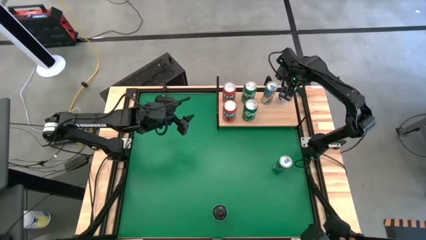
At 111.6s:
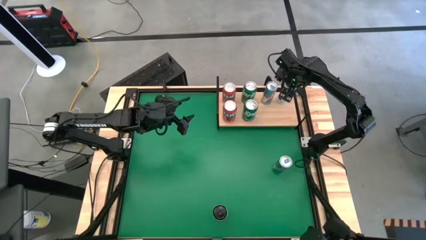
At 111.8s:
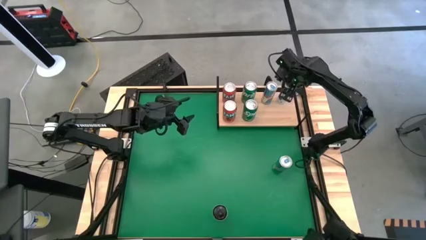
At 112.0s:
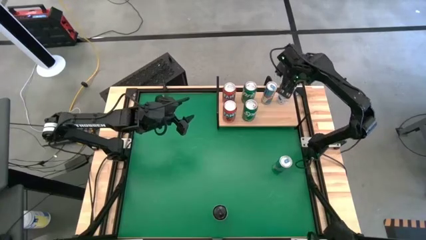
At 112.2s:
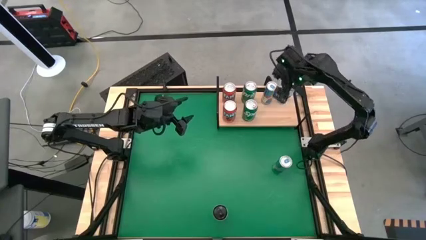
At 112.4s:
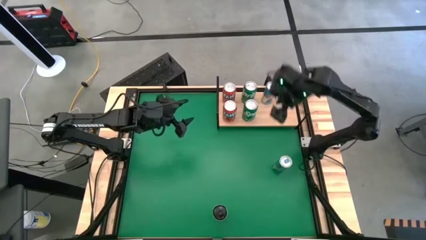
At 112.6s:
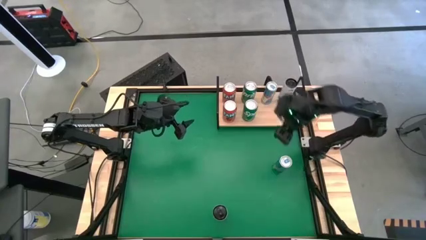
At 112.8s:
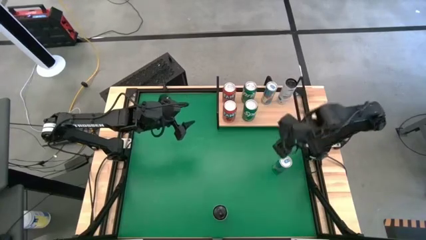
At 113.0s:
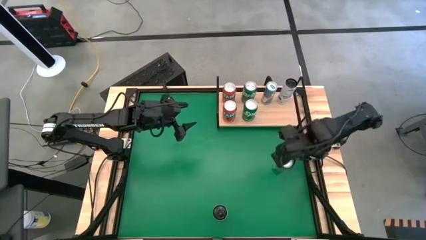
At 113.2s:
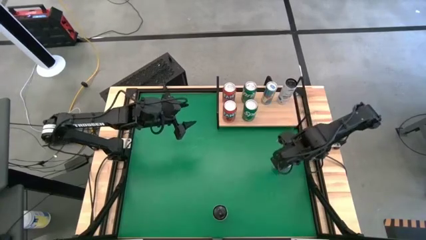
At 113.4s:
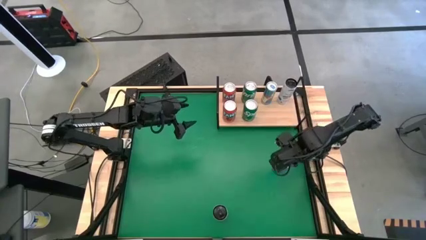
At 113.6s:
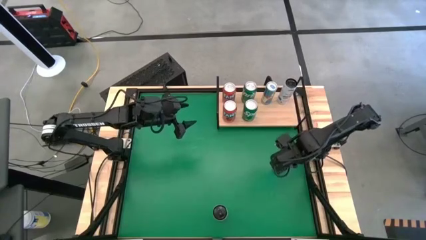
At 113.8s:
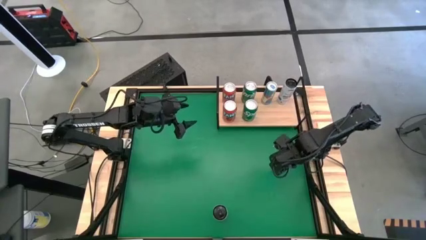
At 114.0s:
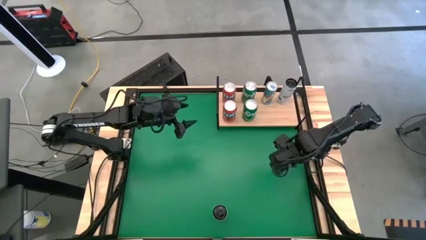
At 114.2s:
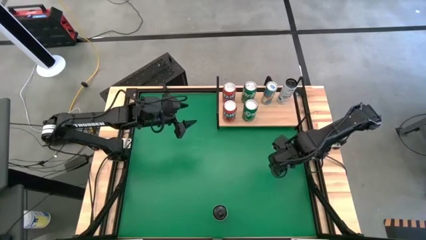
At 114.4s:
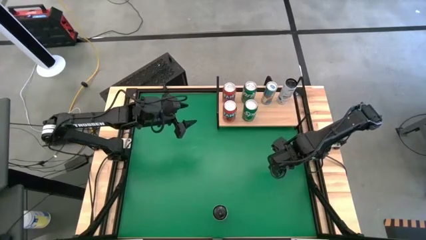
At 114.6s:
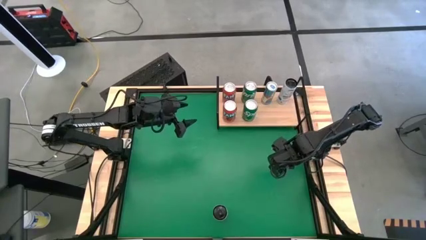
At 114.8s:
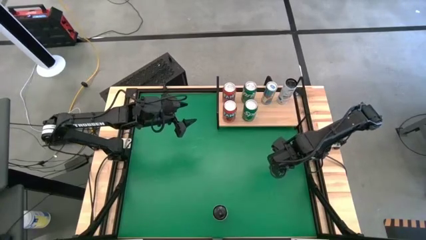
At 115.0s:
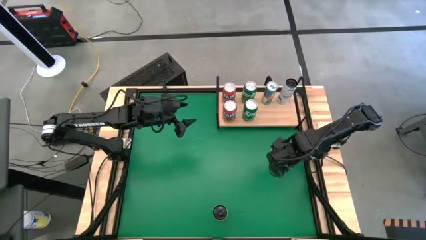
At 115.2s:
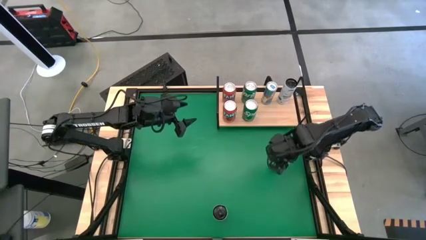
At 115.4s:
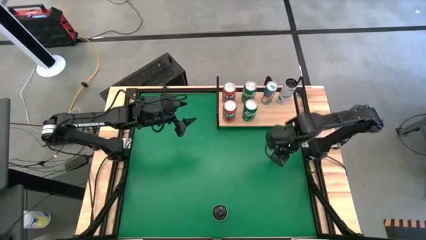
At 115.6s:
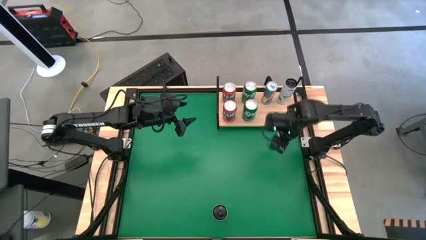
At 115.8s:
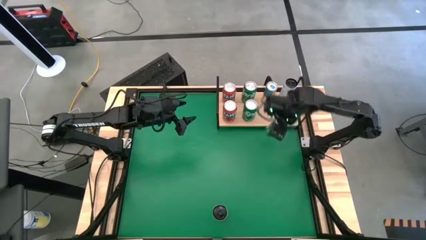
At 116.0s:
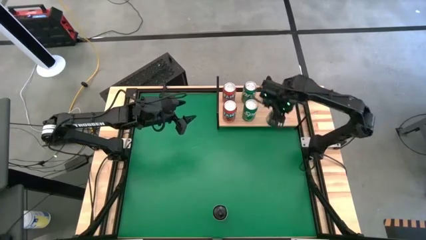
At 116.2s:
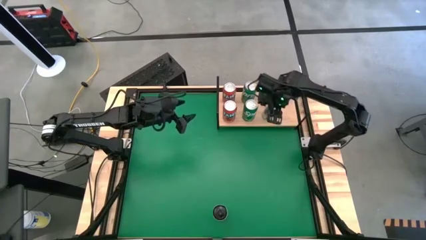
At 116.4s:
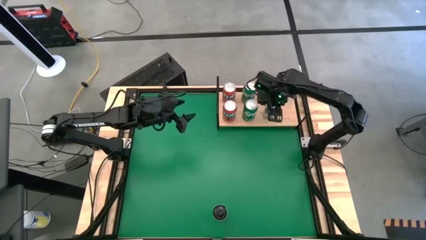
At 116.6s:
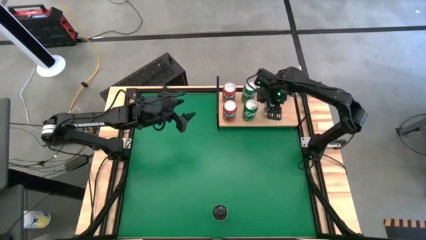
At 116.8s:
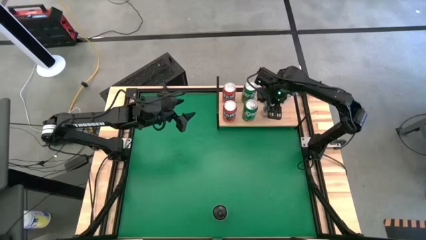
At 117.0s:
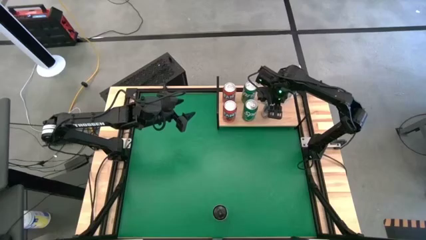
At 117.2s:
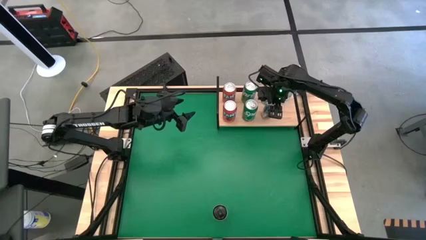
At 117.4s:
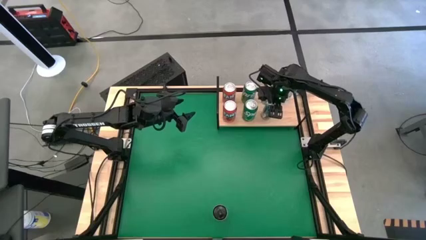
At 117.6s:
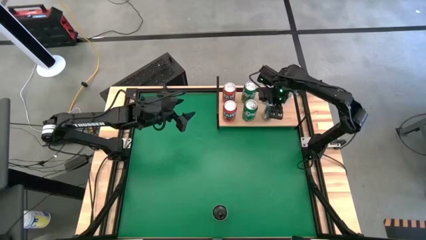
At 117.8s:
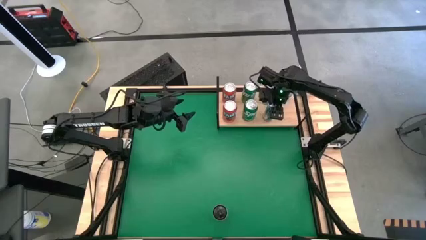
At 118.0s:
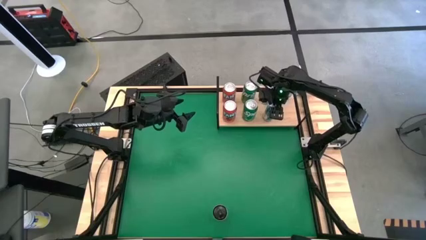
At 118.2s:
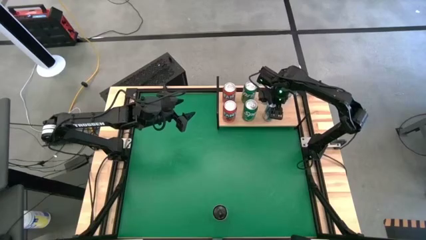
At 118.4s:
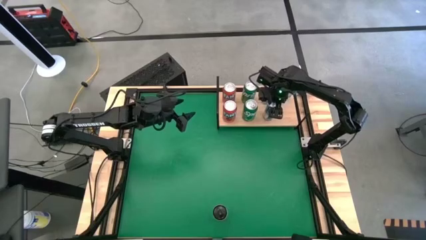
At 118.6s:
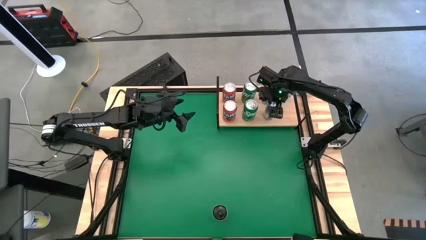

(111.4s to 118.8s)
Task: Place canned beverage on shelf
Put the blue soda can on the shelf aligned with the other blue soda can

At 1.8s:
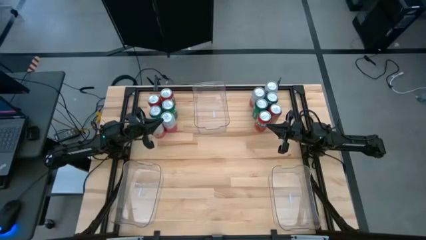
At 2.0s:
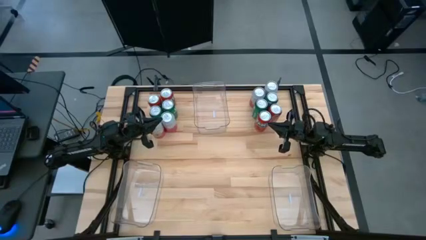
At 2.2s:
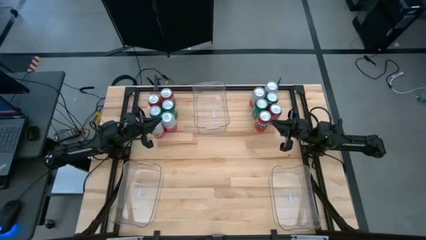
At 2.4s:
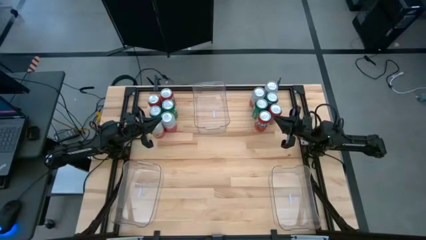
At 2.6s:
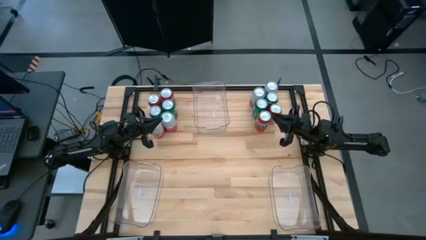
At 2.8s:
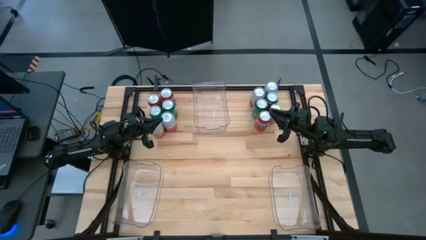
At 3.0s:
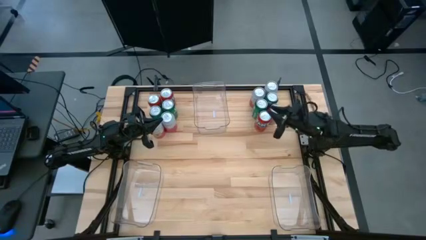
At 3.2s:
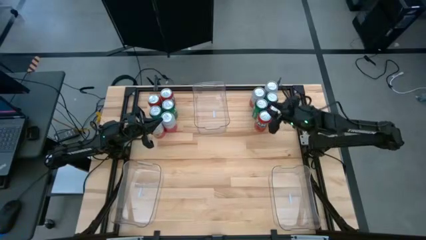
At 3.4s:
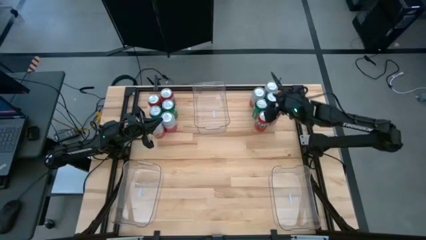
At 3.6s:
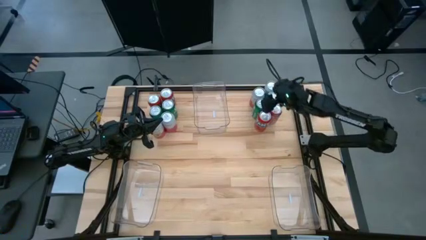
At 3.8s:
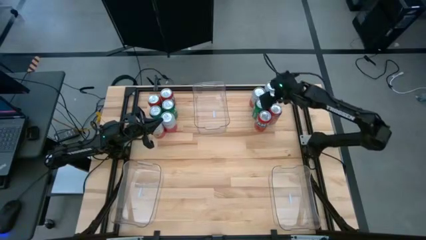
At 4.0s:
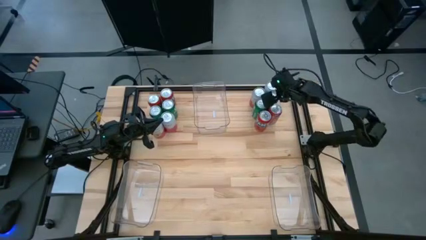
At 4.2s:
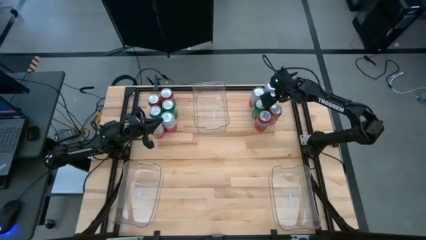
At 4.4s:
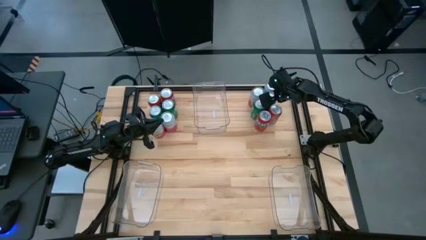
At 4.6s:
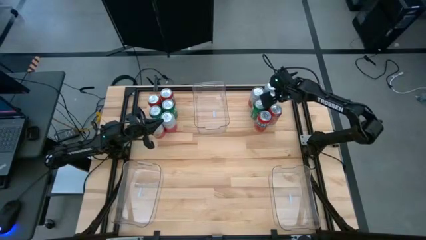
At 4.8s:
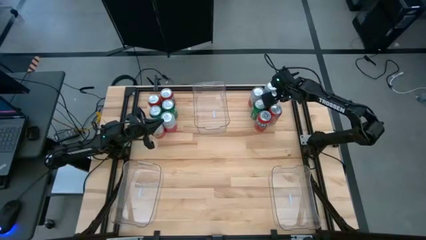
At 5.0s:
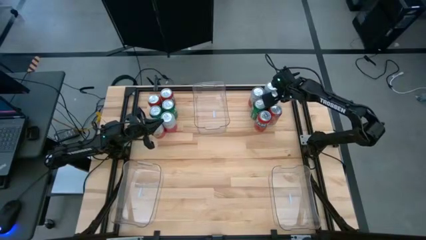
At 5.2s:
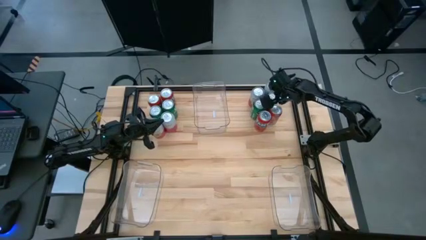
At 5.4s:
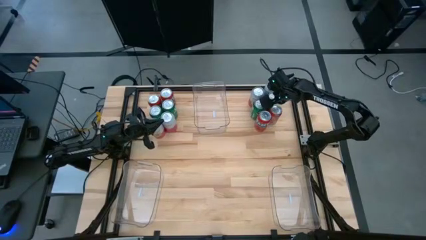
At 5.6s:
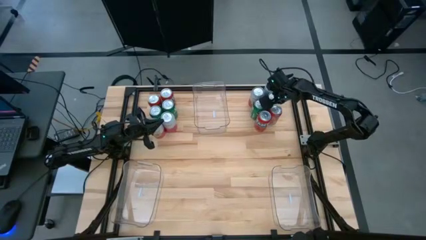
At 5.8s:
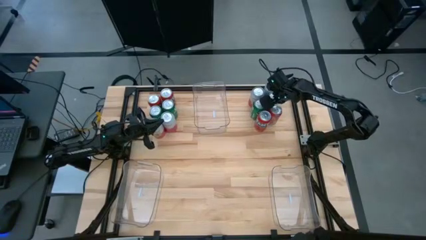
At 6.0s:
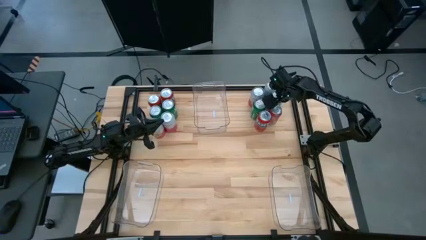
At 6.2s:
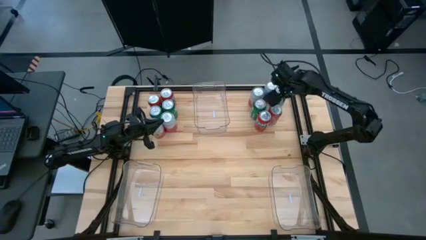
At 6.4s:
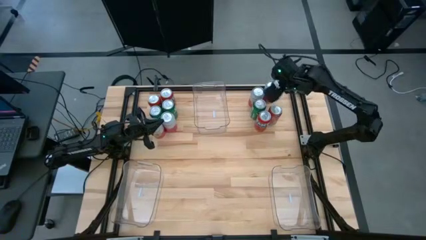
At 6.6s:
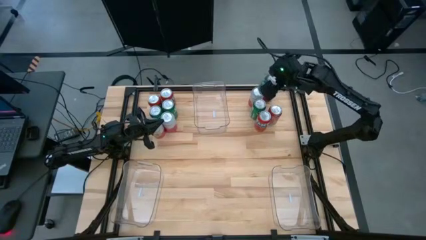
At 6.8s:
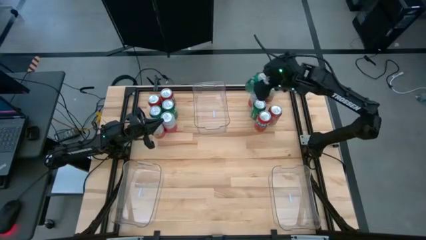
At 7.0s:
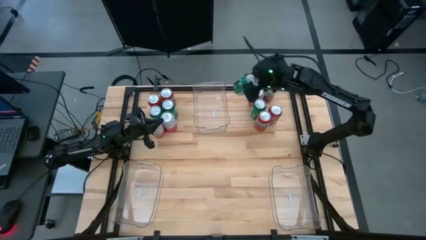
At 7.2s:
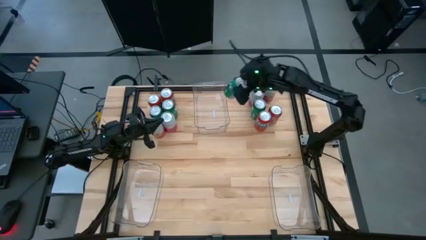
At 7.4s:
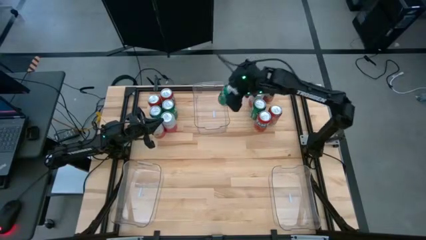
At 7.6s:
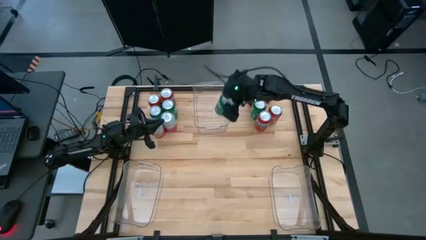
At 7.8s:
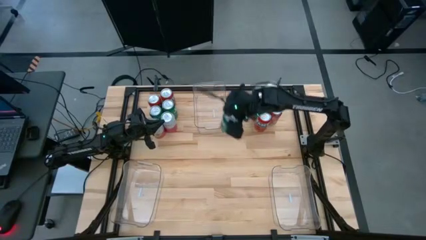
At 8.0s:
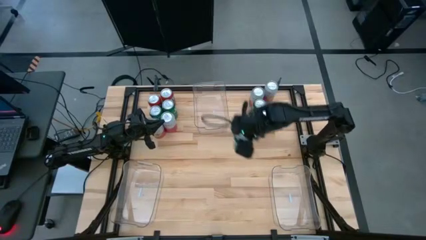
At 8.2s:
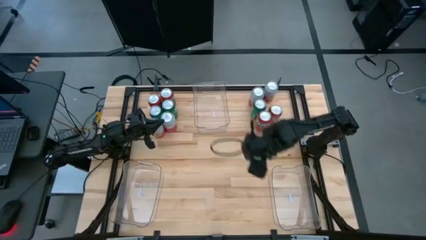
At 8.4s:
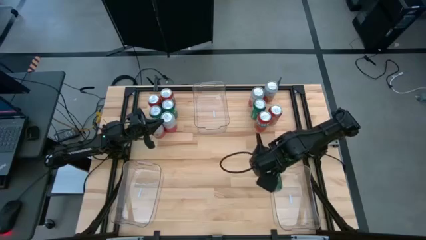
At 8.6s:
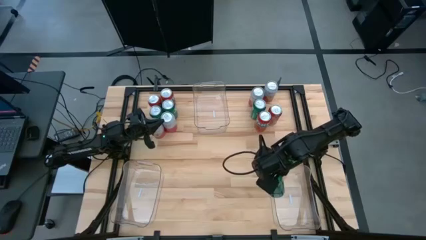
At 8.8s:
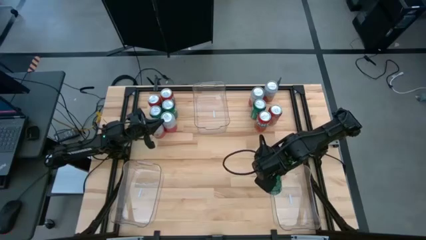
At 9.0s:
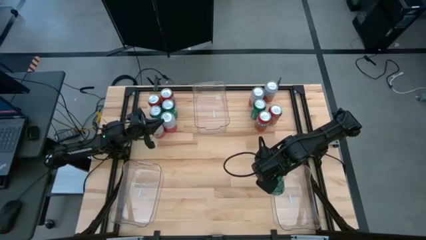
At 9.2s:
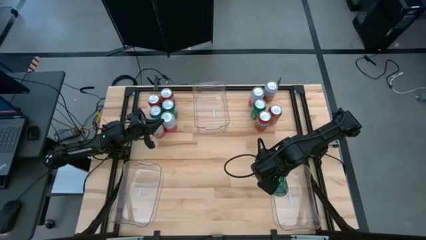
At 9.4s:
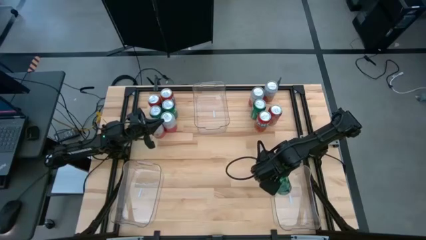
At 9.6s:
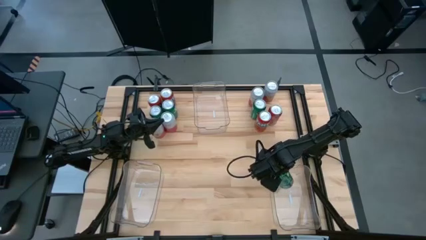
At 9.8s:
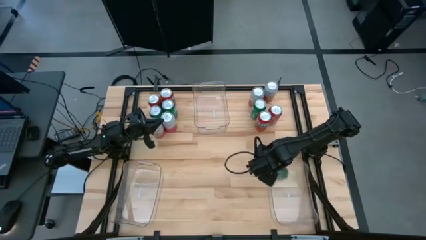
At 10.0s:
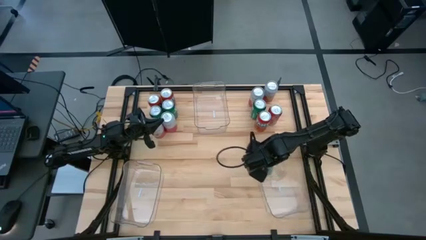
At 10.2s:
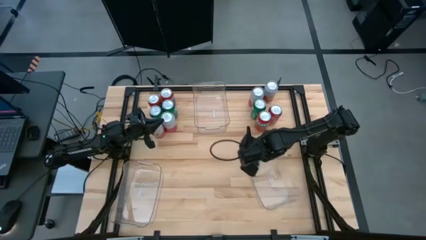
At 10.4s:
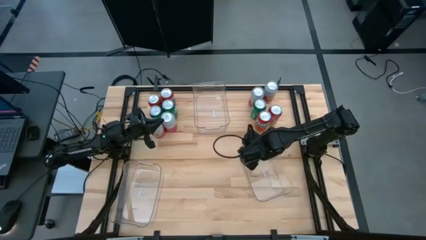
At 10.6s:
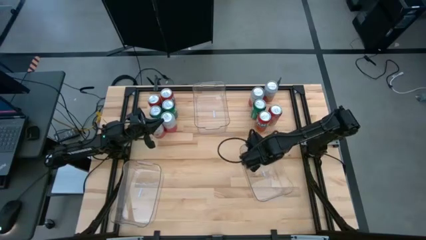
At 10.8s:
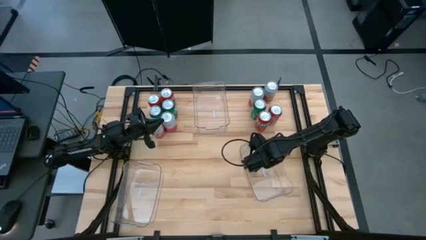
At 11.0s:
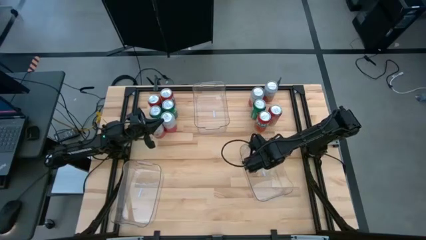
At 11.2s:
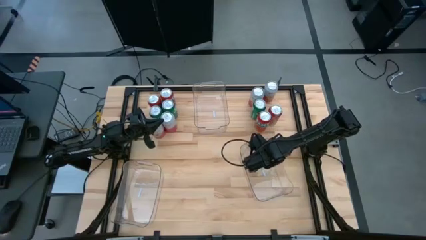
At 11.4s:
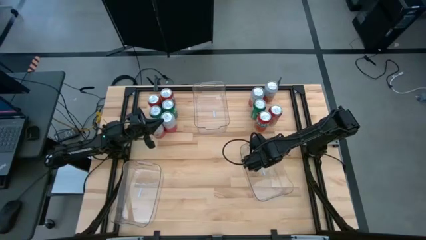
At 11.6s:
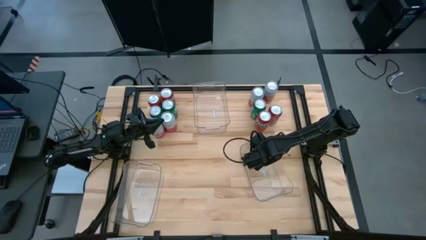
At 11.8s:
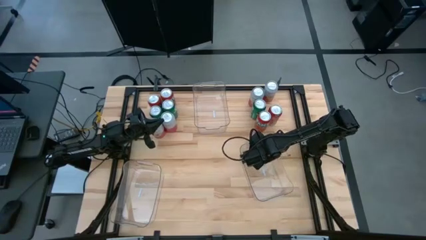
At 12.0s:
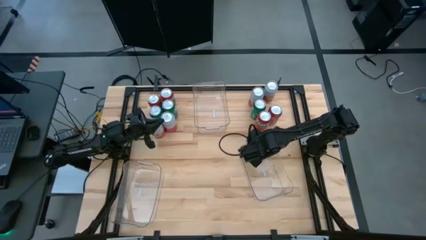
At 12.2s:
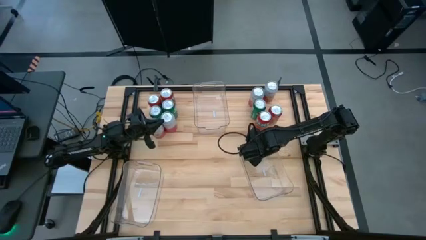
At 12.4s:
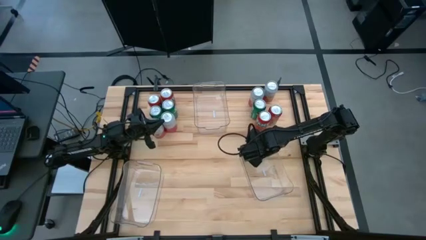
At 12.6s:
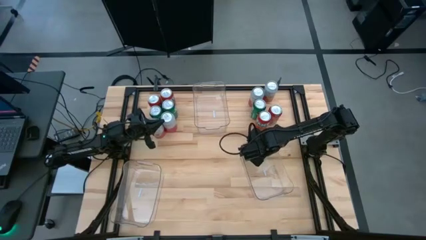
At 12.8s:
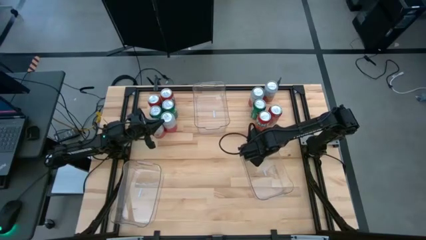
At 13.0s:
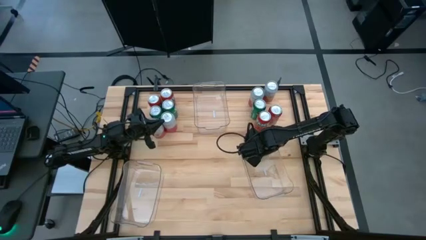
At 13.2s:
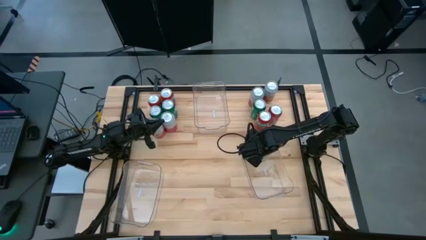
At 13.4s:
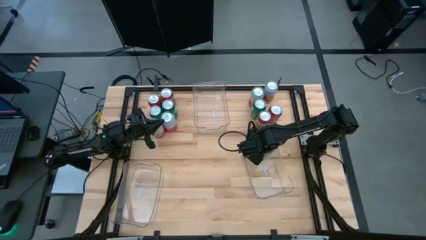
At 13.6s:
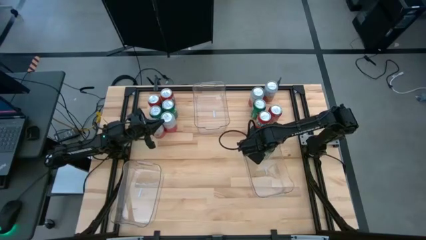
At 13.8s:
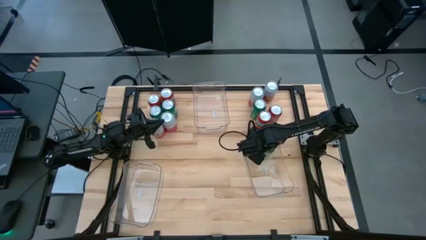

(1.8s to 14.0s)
Task: Sort soda cans
Put the green soda can into the bottom right transparent bin
